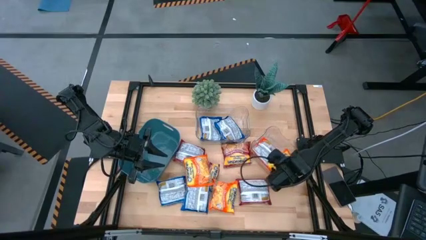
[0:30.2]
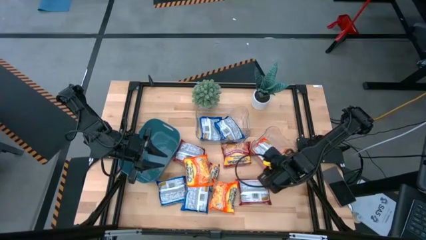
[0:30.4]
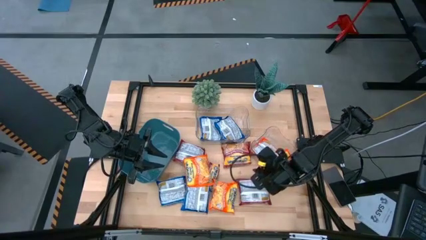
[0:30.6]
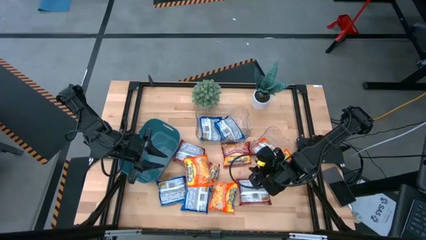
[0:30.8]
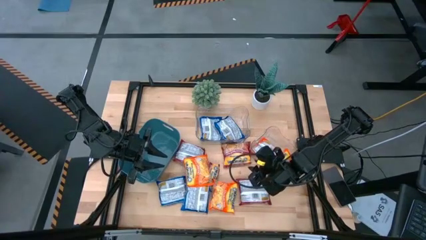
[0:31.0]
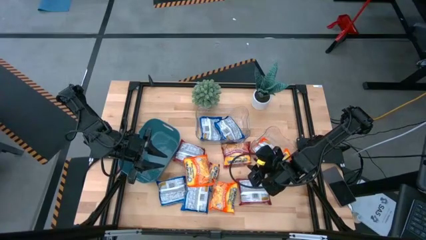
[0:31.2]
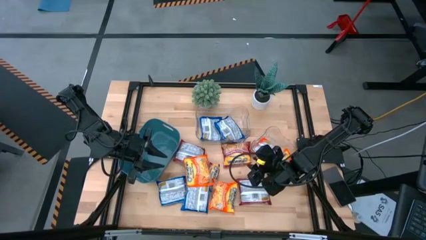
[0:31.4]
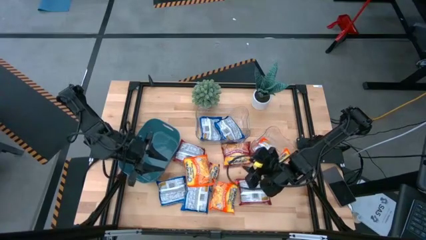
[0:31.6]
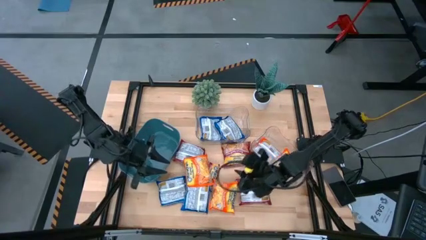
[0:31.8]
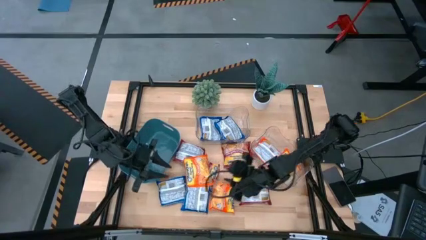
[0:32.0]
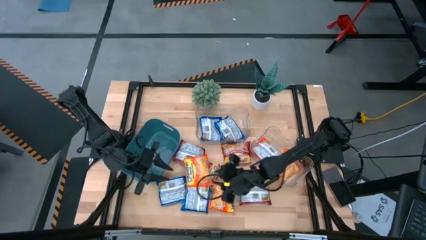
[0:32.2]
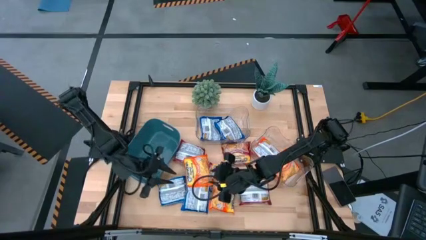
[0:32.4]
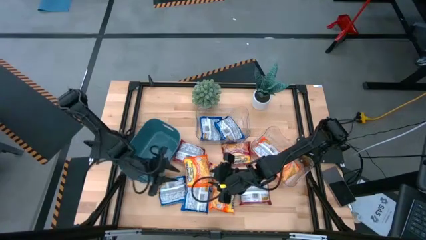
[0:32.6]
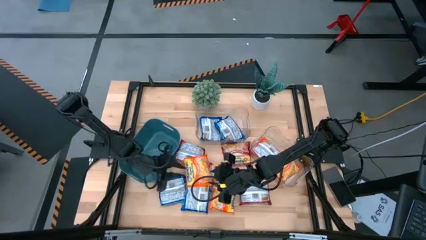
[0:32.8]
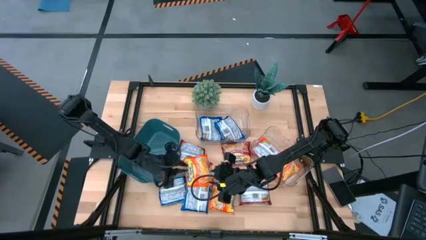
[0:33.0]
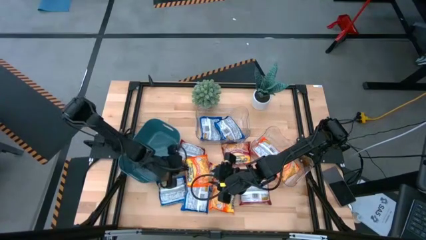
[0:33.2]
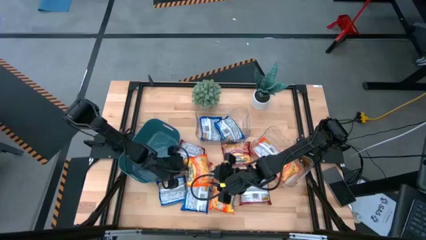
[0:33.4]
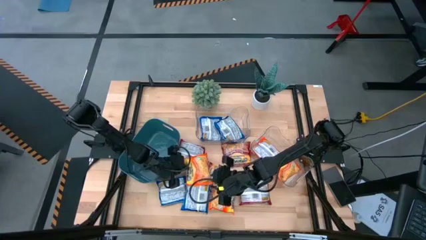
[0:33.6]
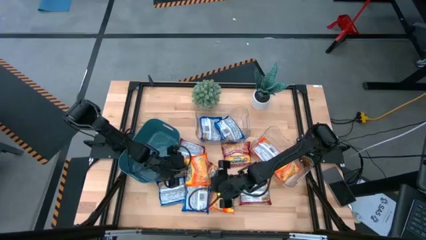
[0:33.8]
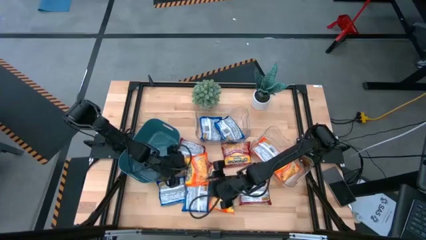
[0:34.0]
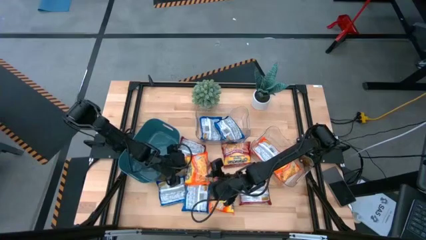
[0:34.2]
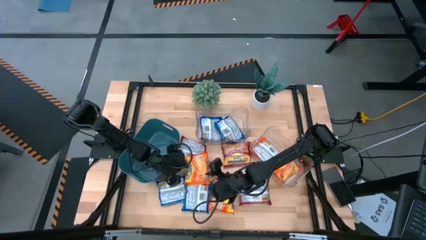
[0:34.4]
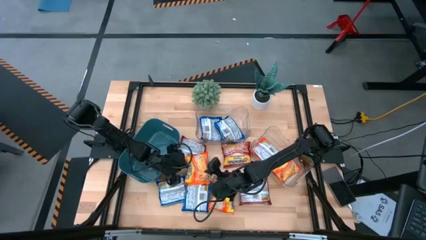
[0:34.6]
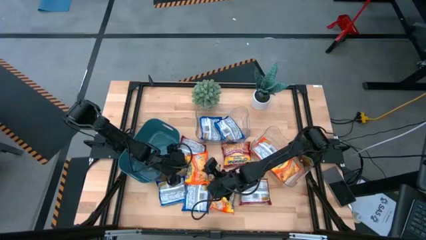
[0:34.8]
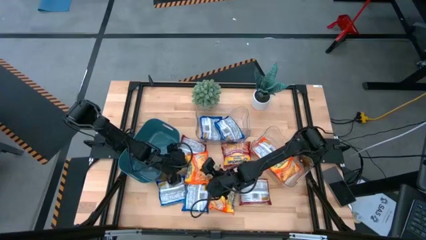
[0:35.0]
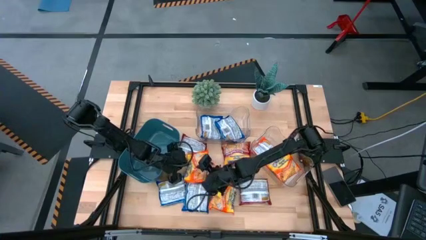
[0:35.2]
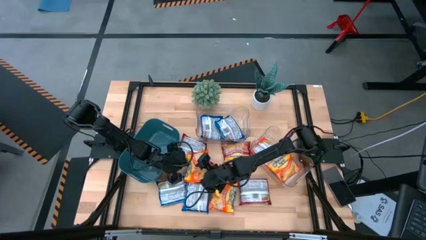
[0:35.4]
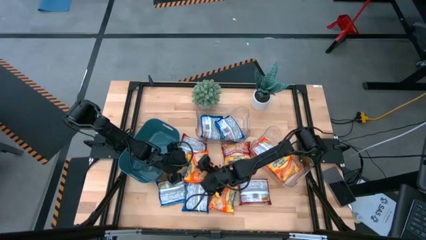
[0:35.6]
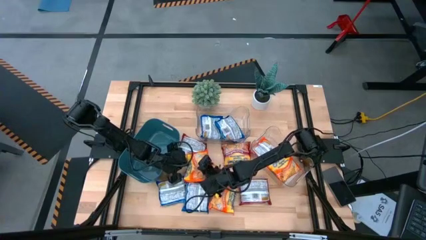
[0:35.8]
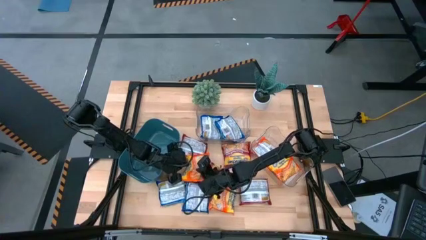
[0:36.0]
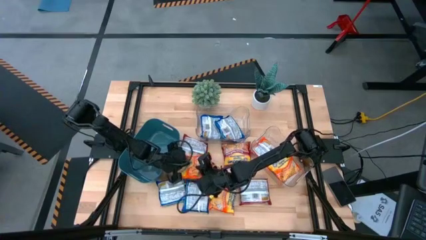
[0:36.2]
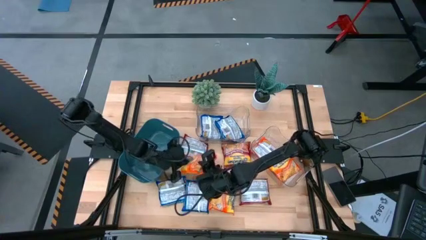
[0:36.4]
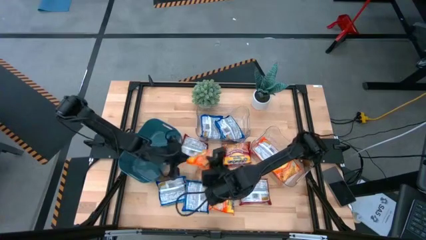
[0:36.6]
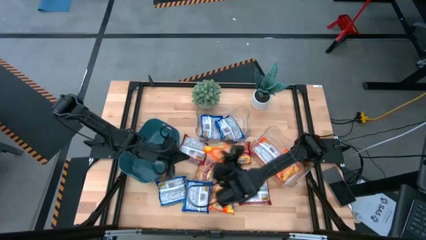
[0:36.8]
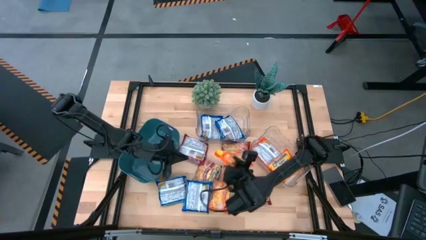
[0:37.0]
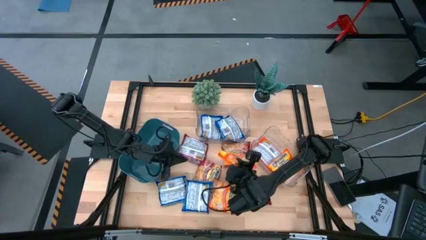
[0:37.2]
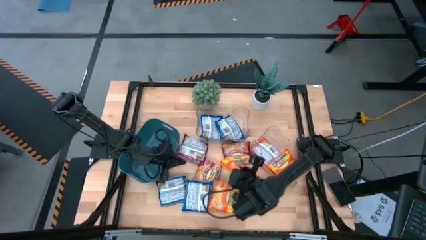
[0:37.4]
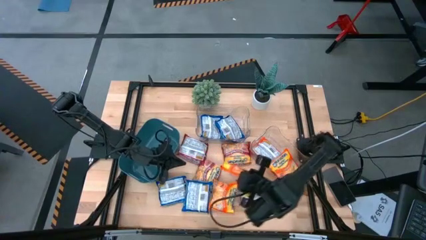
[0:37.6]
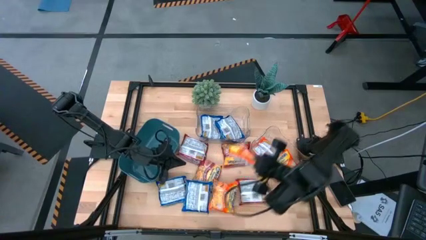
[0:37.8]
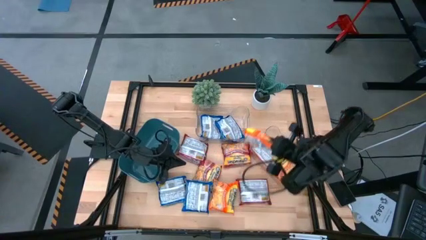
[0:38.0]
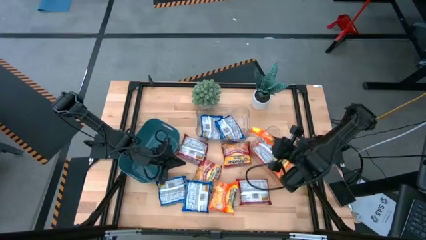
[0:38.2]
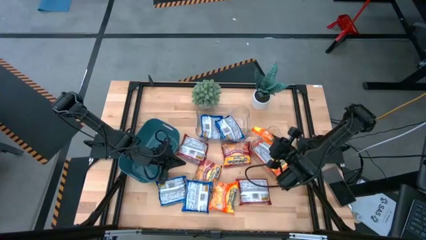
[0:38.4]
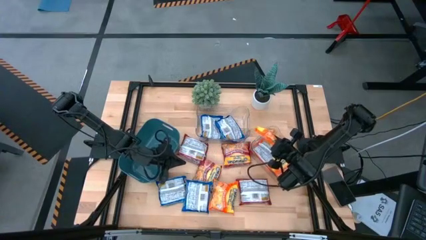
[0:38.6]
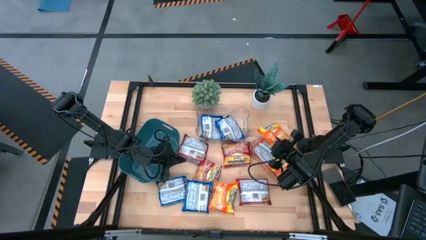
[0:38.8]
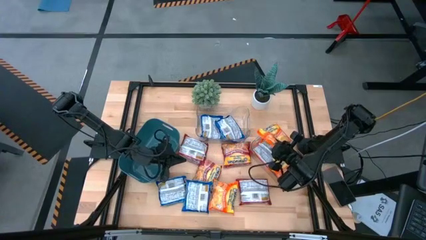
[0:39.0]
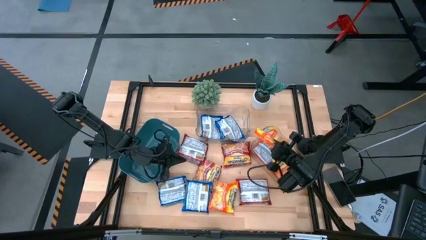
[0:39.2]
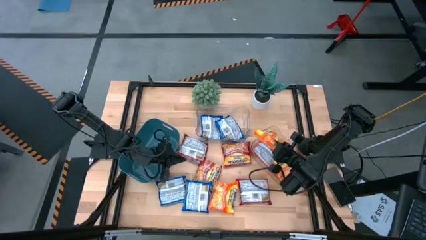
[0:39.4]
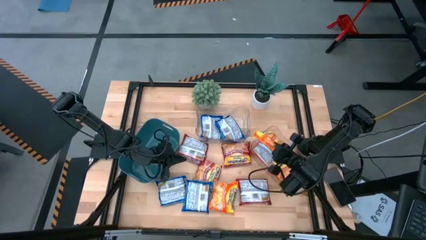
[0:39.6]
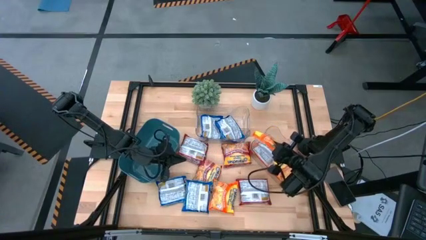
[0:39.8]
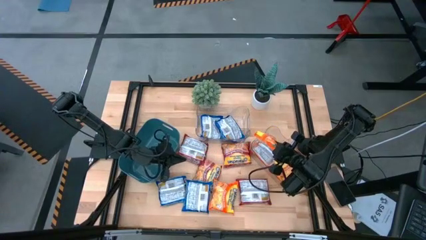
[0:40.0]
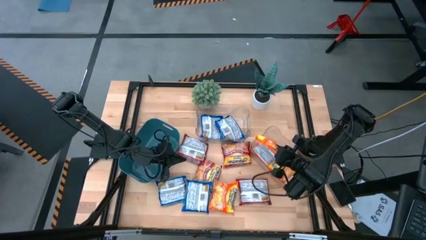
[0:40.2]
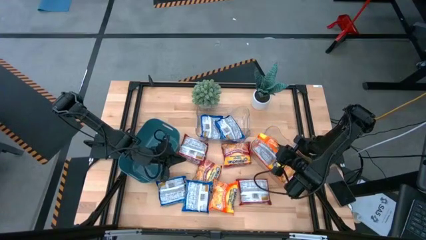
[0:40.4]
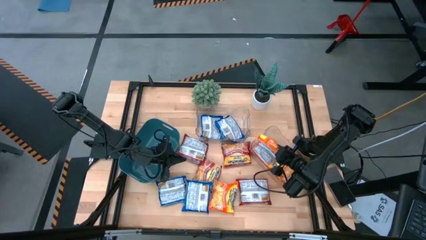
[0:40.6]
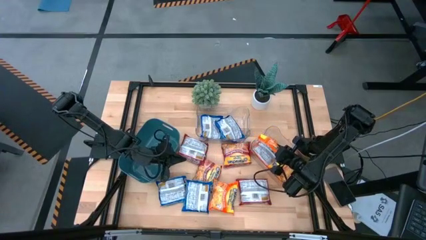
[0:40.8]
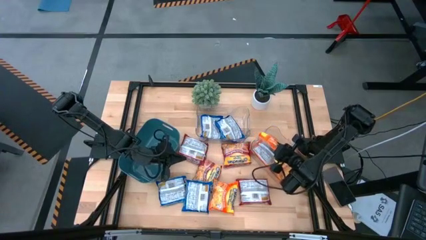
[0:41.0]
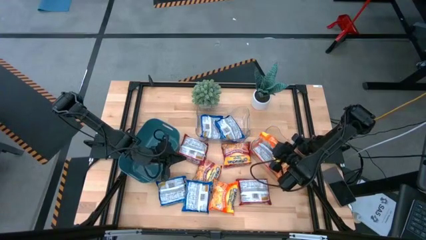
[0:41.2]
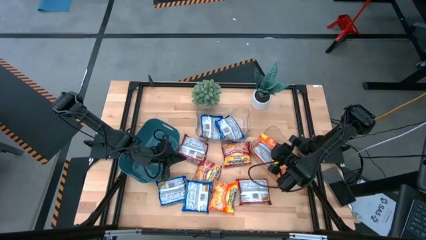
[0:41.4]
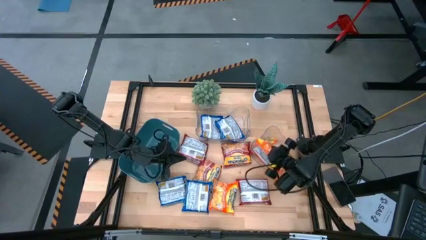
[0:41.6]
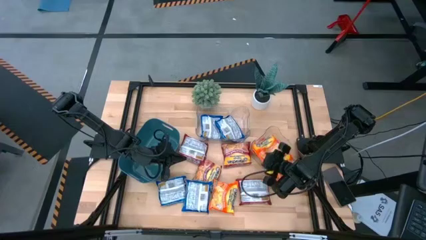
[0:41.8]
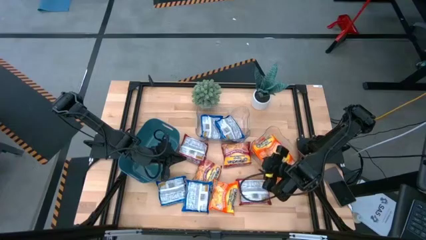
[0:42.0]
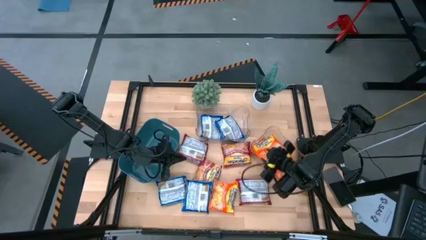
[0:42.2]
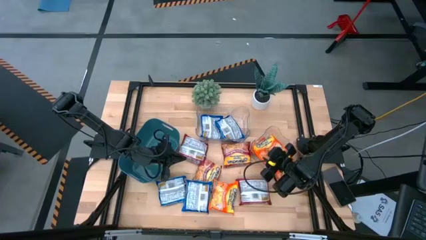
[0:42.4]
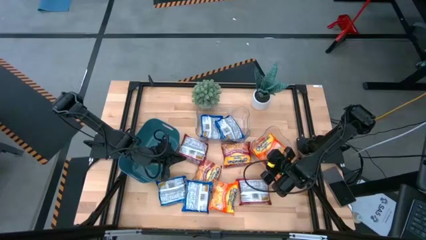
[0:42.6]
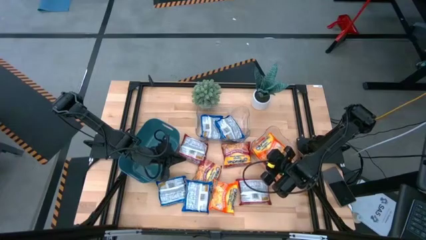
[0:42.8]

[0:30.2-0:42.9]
Task: Sort Maruchan noodles
Stack the left orange noodle pack on top of the orange noodle pack in the right transparent bin

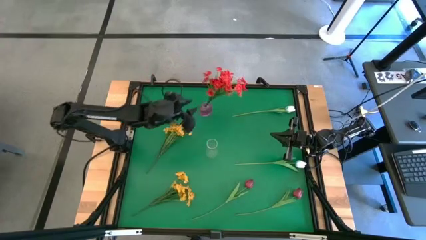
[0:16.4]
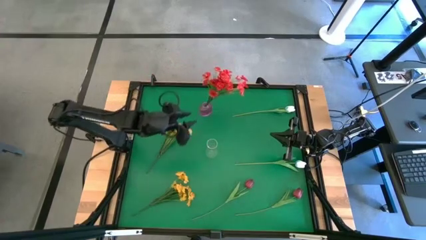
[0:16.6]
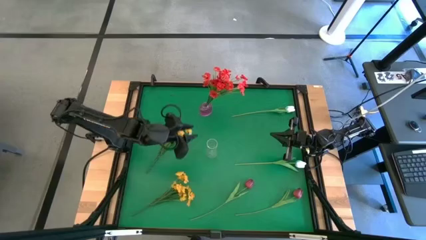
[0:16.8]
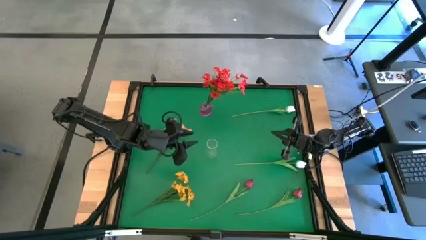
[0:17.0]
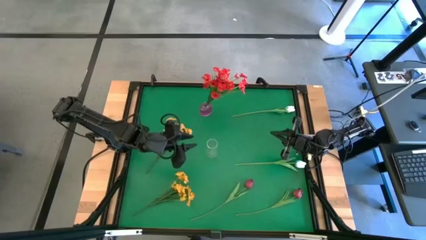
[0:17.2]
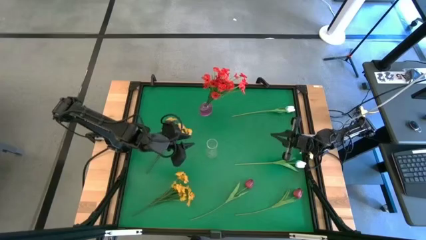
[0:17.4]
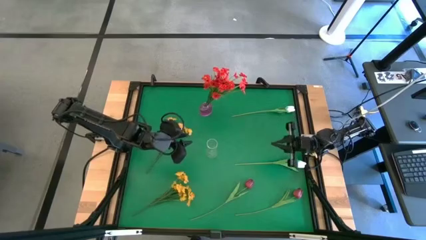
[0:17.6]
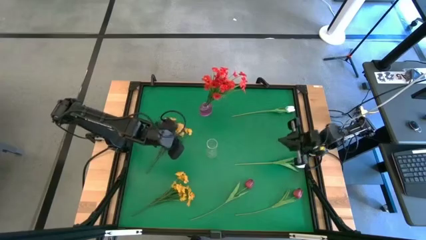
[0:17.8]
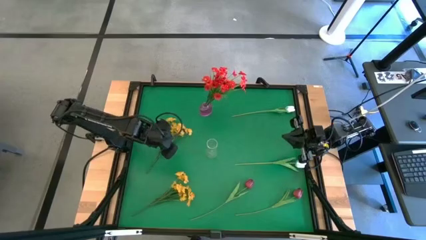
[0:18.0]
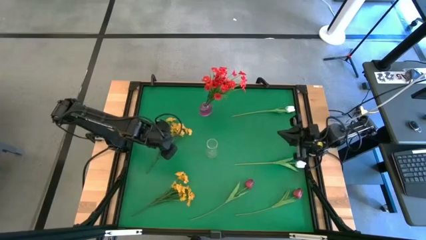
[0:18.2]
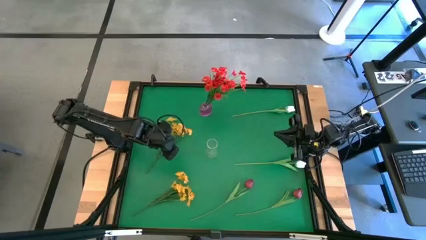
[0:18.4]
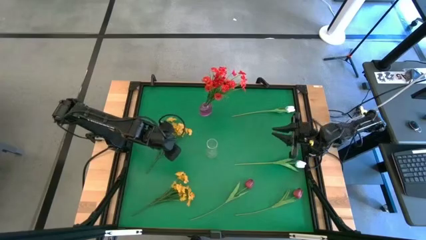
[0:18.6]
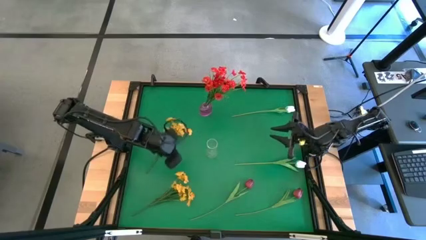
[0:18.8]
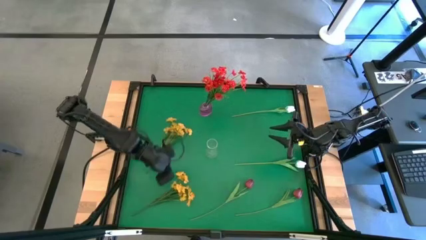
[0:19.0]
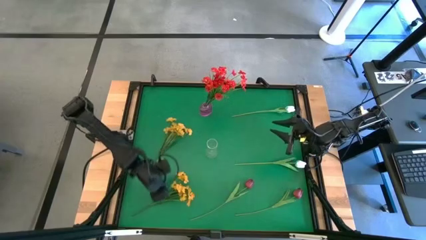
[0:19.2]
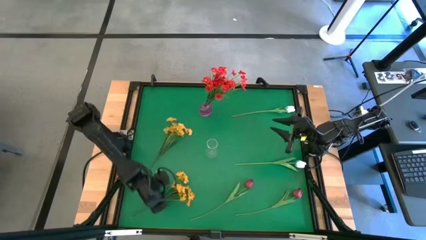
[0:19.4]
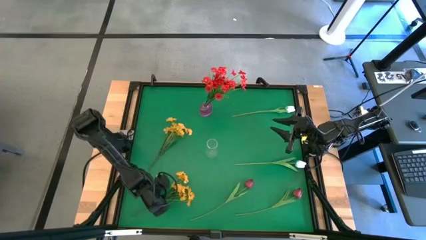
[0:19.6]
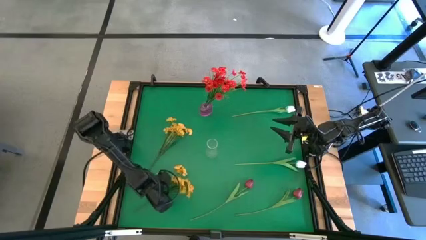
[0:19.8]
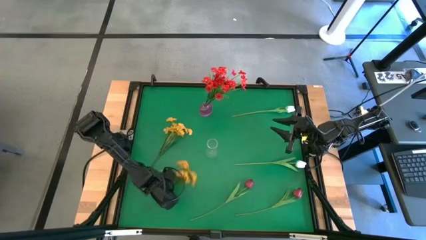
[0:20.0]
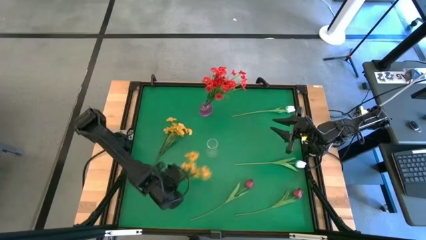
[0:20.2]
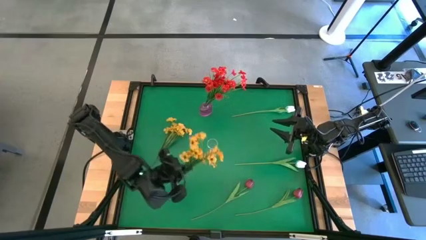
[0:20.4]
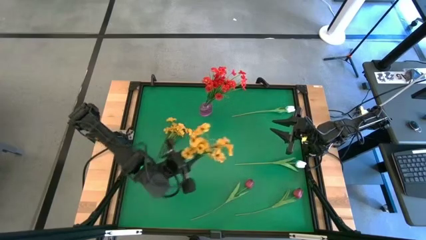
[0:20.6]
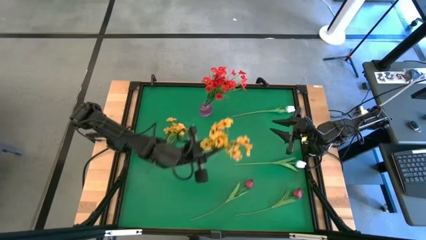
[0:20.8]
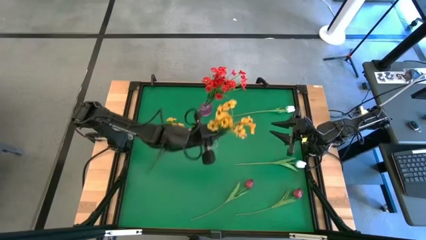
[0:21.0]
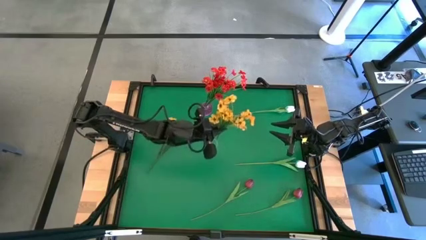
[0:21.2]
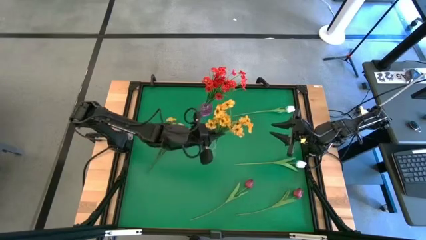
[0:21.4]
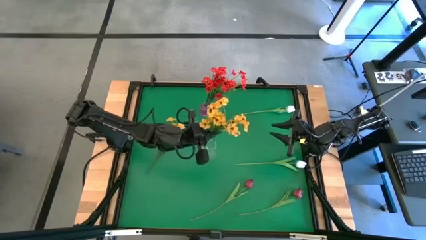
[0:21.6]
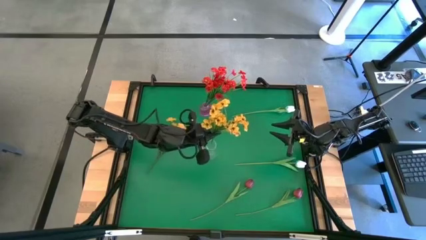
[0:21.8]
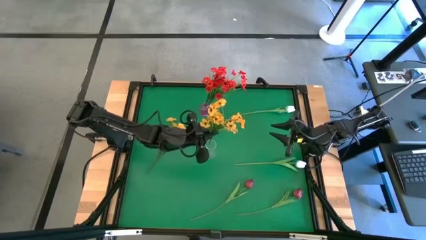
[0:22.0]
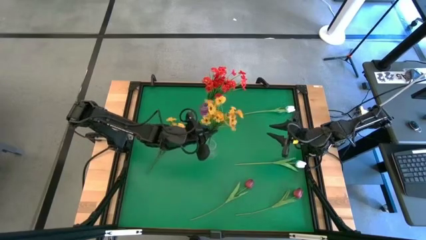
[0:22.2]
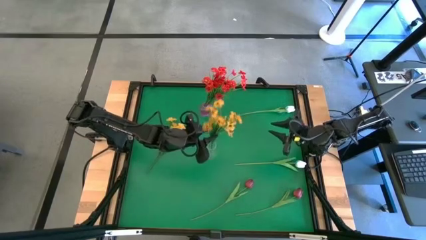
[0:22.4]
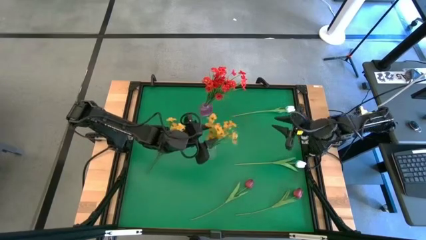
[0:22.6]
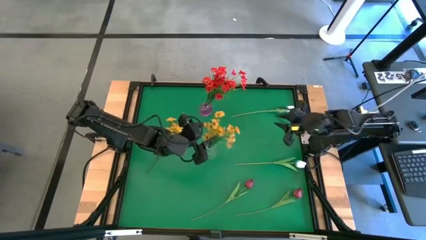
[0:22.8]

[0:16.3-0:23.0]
Task: Sort flowers into vase by color
Put the bottom yellow flowers into the transparent vase
